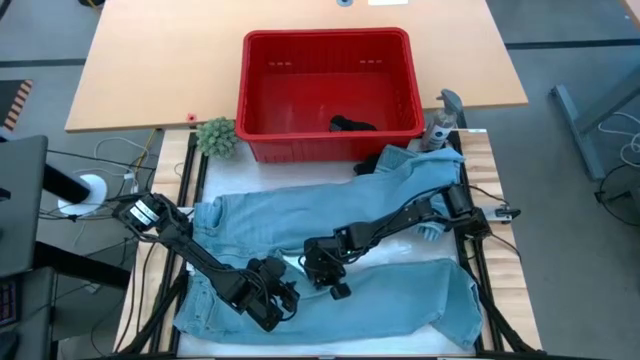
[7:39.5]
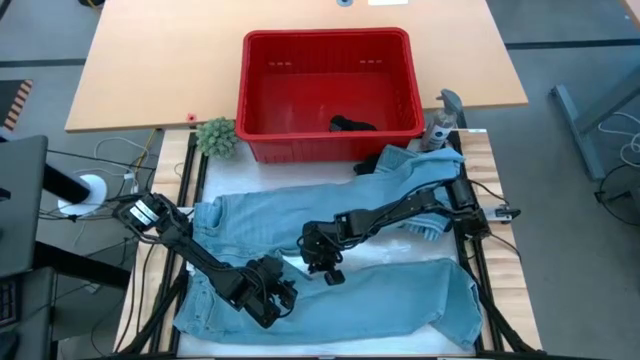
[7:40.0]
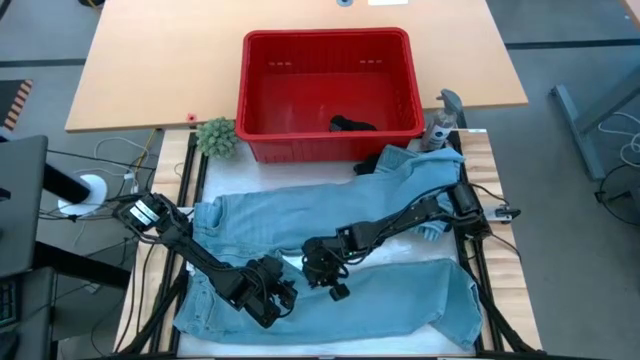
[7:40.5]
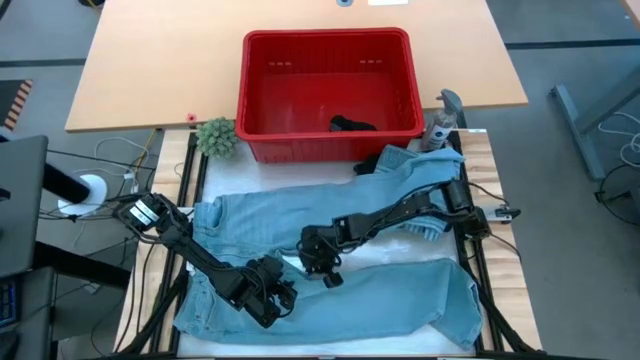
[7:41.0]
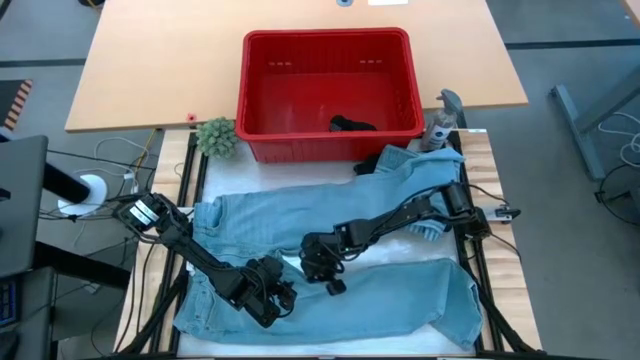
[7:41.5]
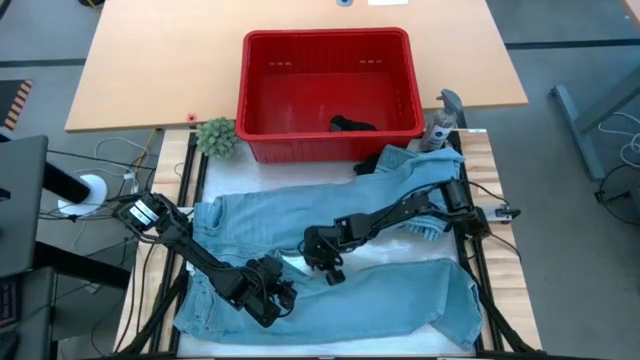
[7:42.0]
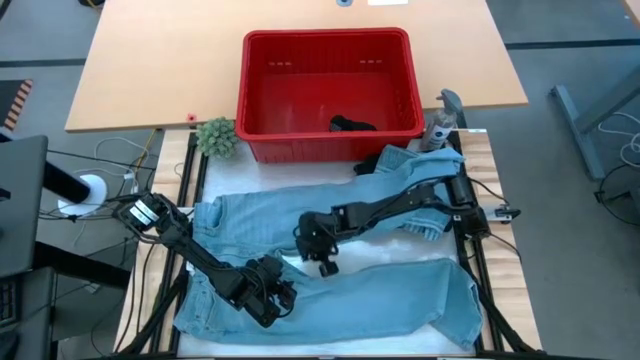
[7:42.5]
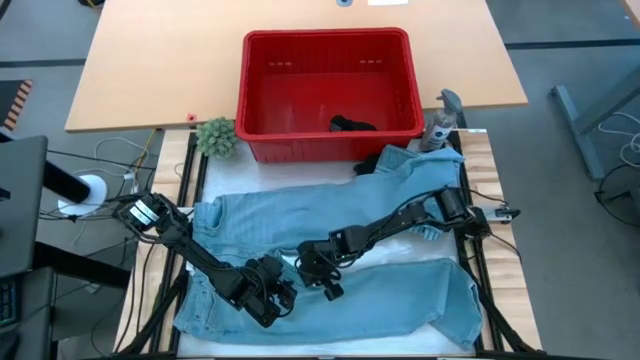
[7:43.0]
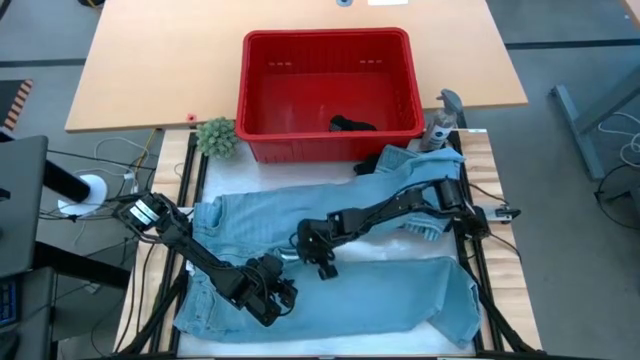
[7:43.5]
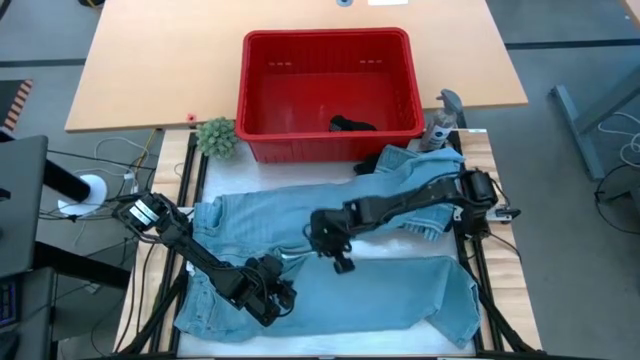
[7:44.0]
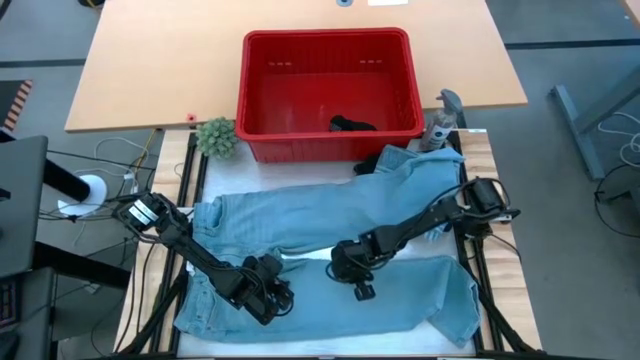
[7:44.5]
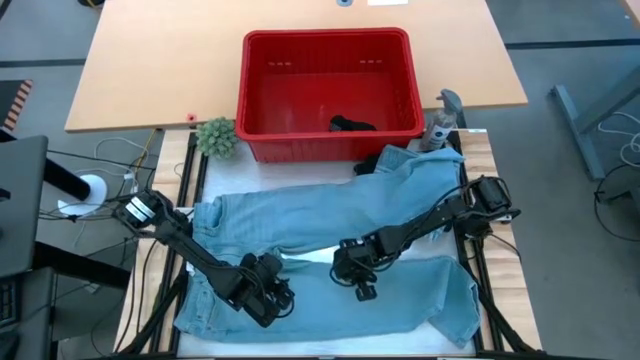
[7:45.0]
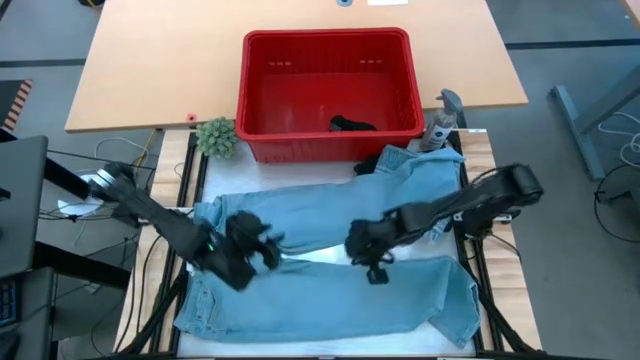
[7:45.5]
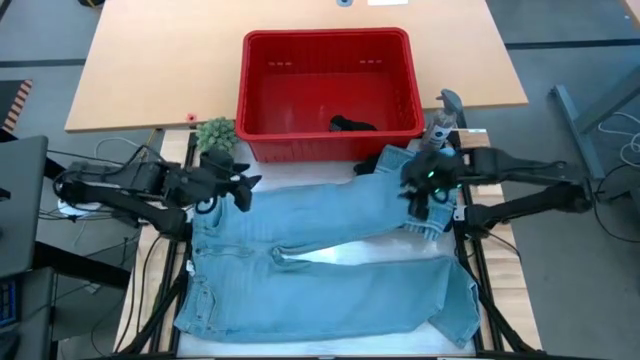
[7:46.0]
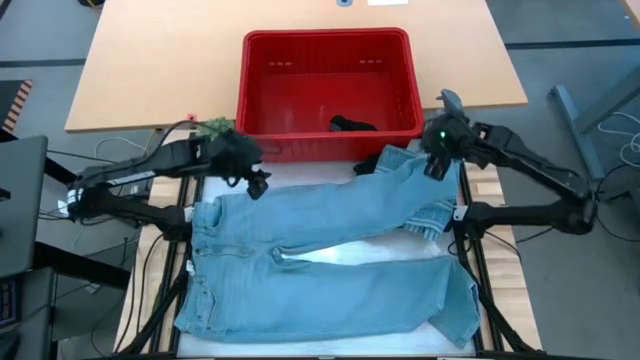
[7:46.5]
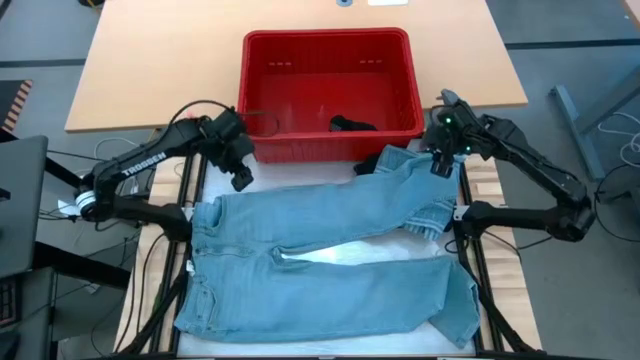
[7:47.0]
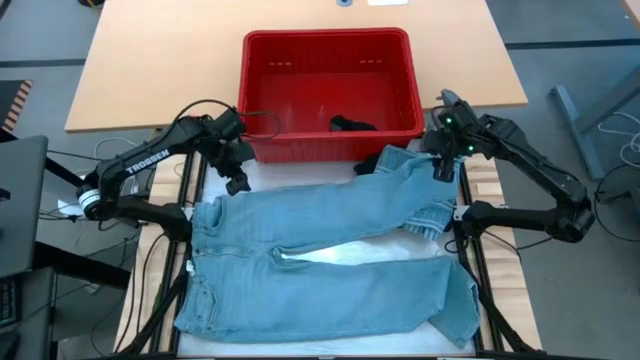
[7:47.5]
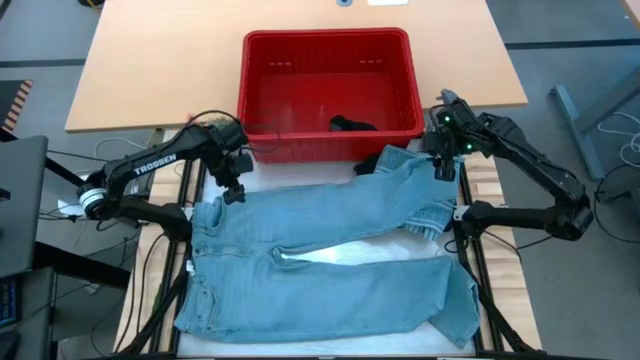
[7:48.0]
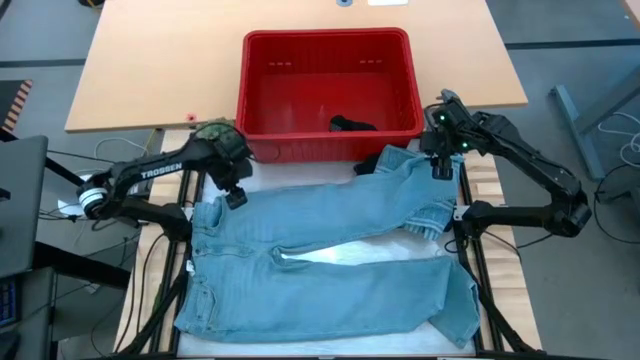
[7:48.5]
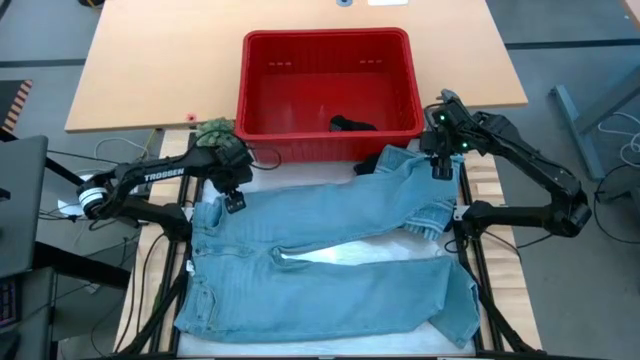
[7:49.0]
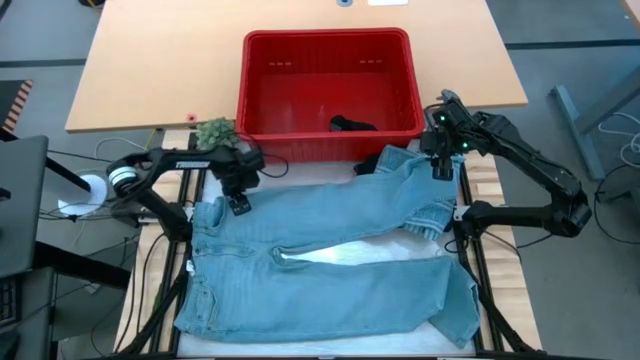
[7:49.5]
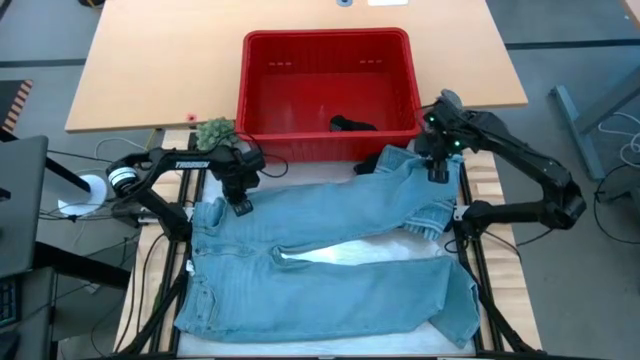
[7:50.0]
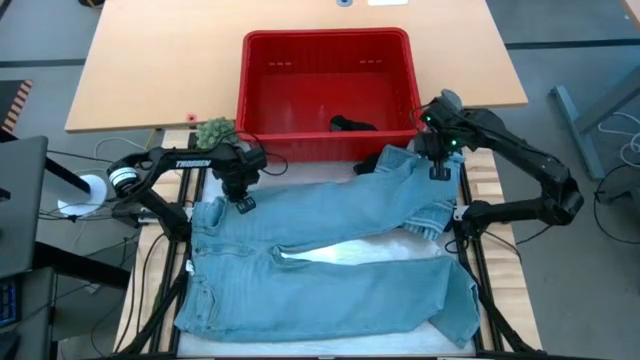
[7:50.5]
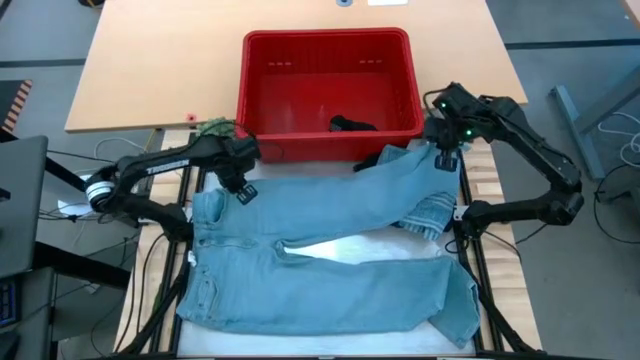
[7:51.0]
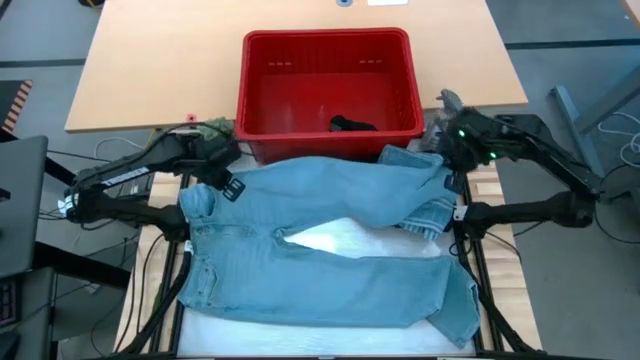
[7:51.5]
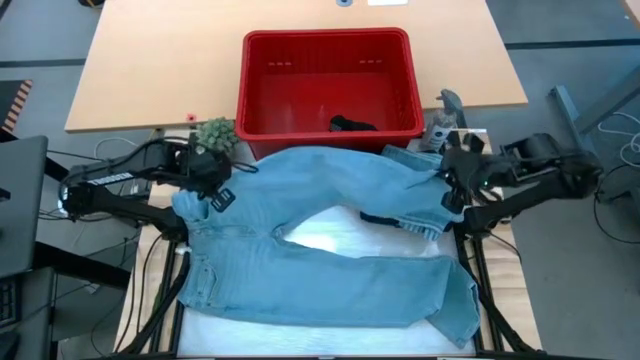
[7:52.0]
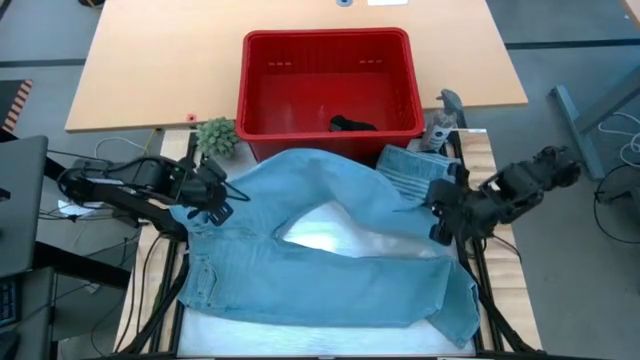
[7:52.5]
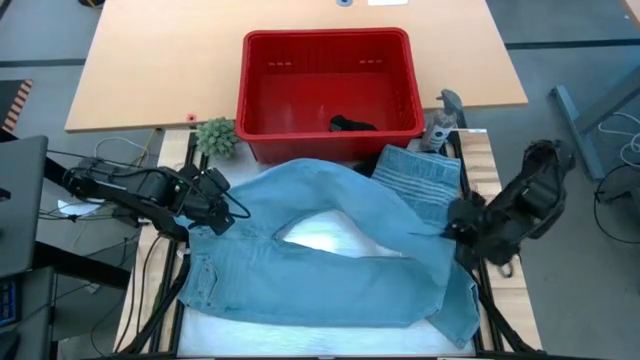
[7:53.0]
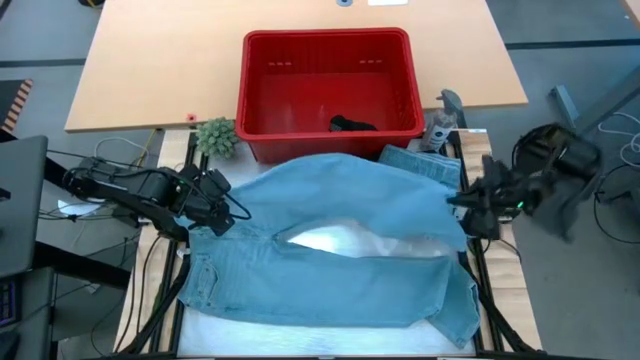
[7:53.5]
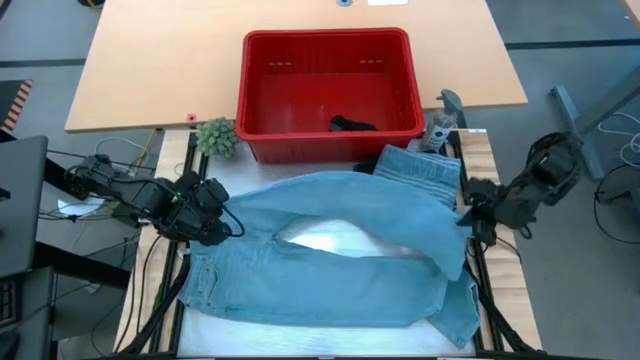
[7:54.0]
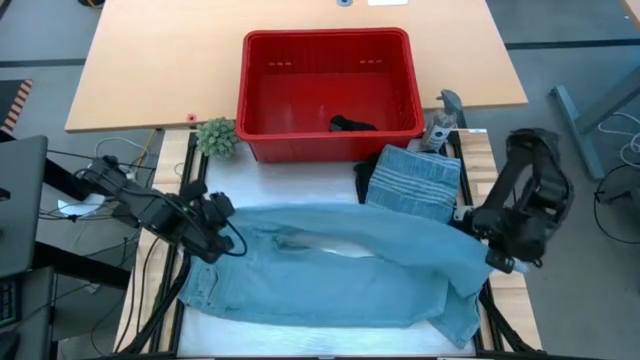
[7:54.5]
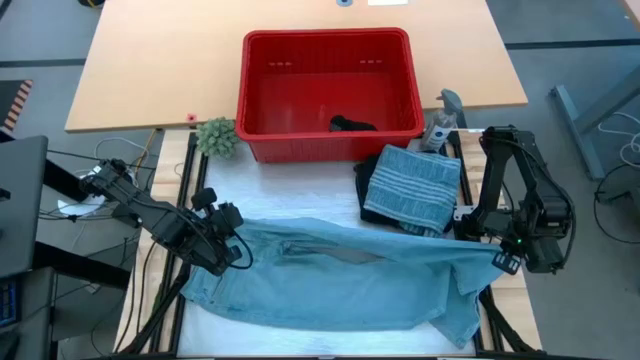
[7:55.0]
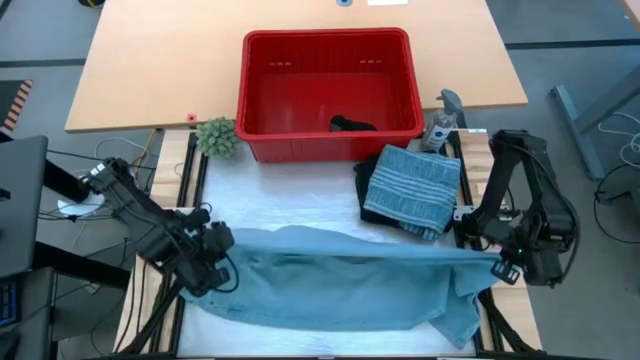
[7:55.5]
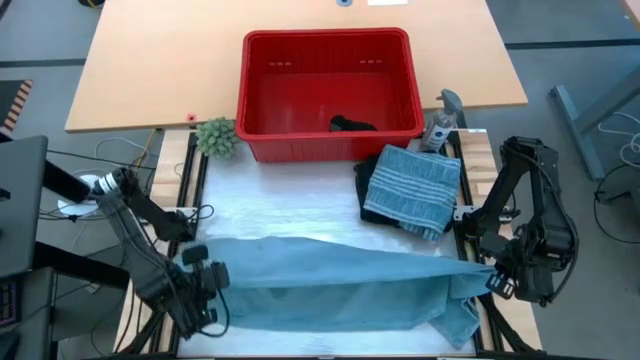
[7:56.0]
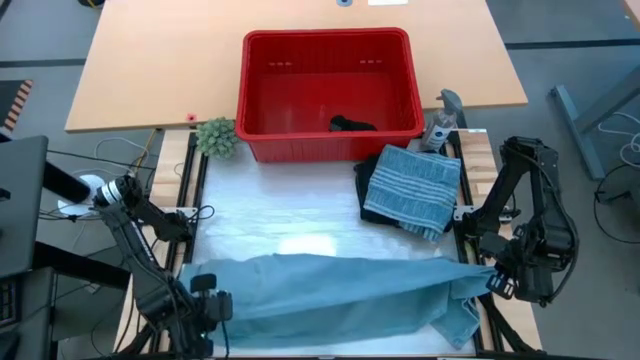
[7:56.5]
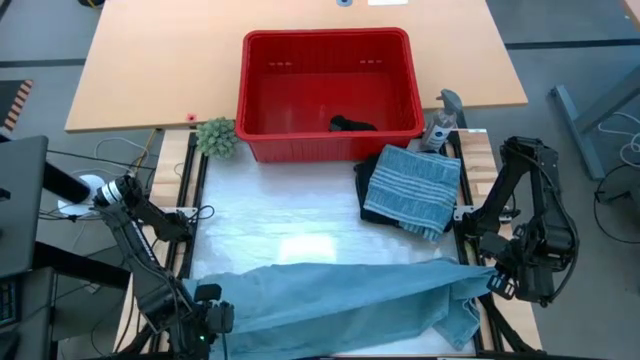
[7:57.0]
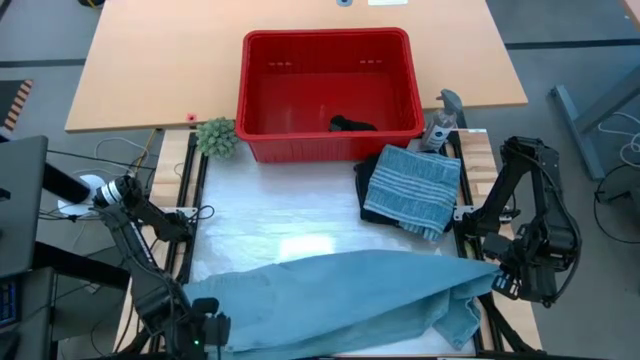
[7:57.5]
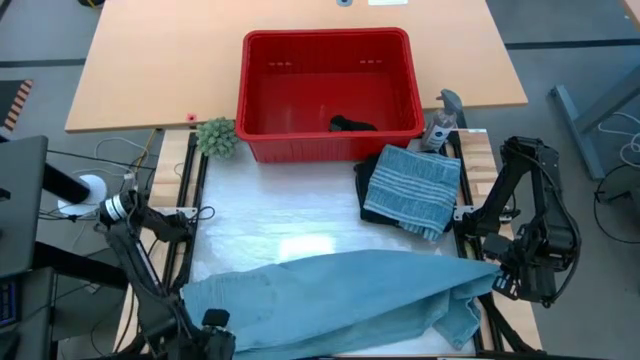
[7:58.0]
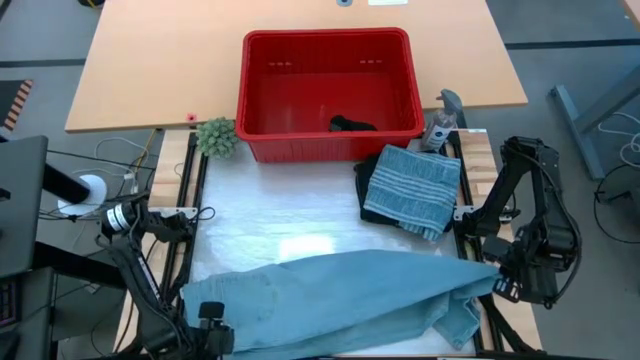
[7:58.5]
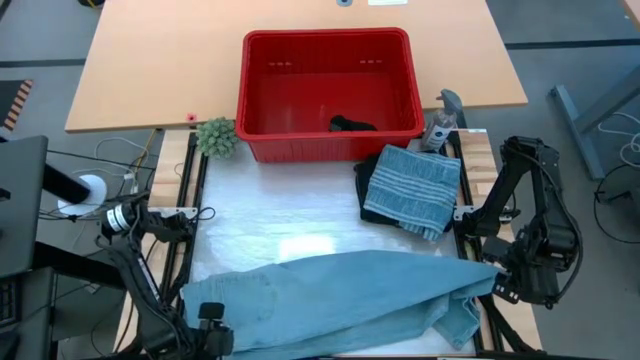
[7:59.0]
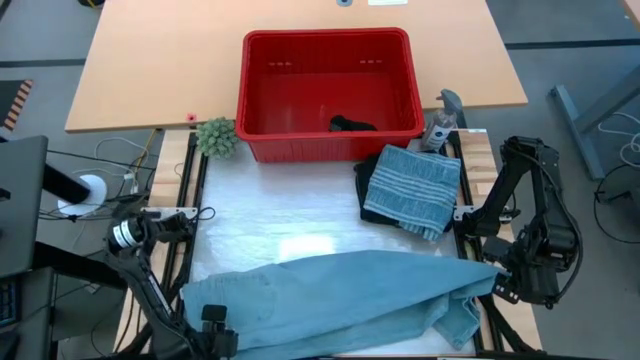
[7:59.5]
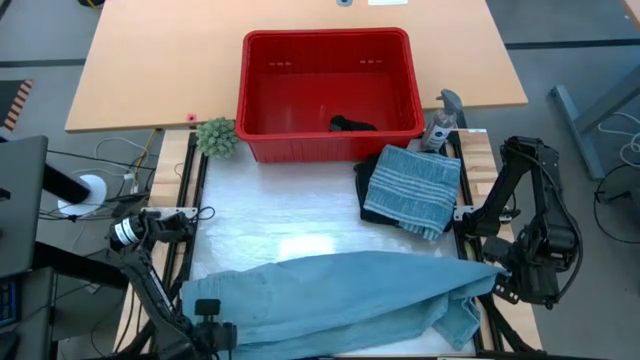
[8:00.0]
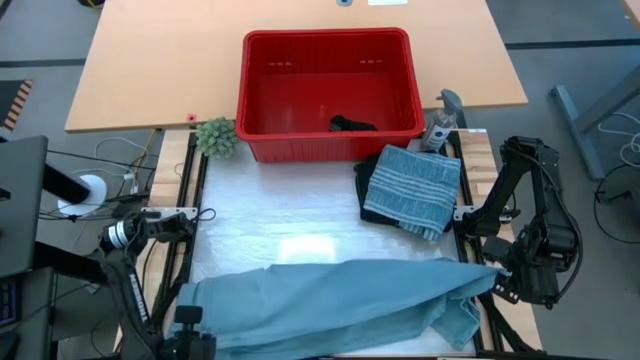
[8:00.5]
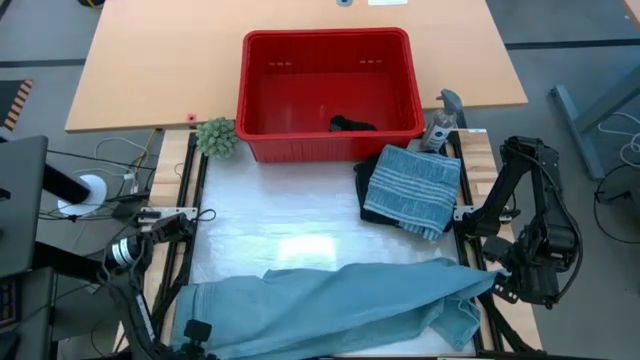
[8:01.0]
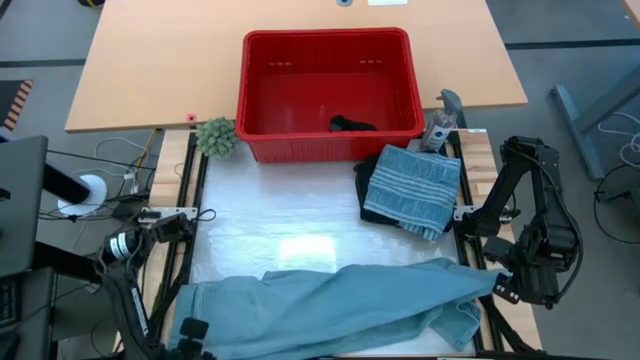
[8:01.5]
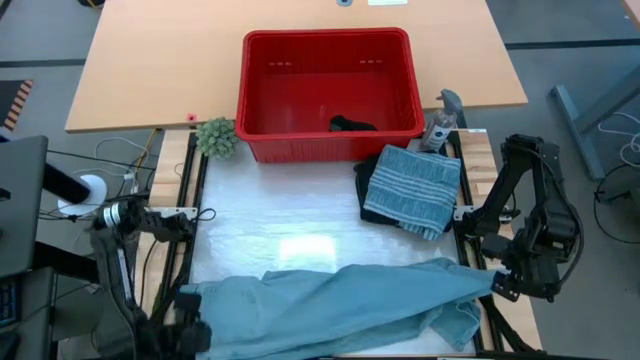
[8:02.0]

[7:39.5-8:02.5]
Task: Fold Laundry from Bin
Fold the blue pants
